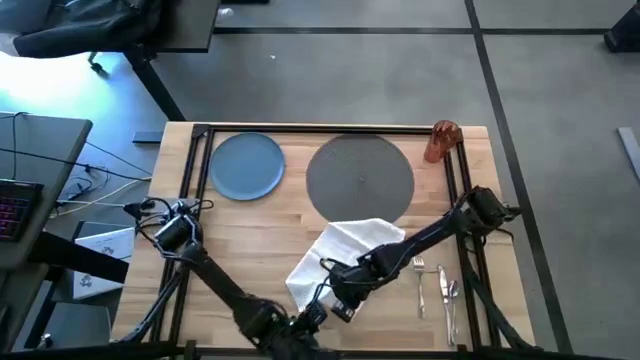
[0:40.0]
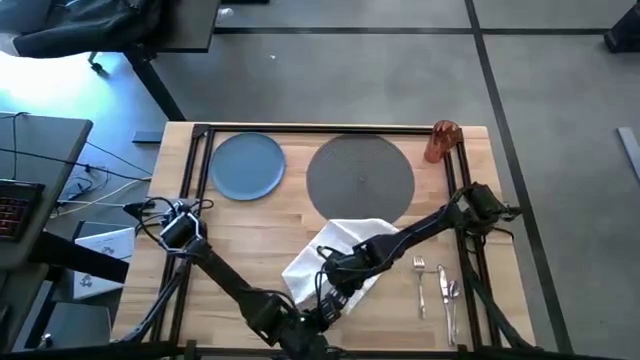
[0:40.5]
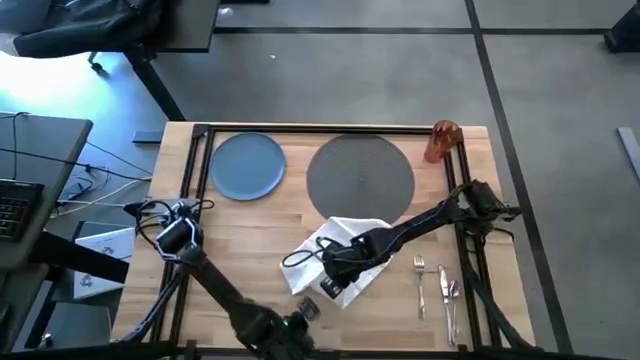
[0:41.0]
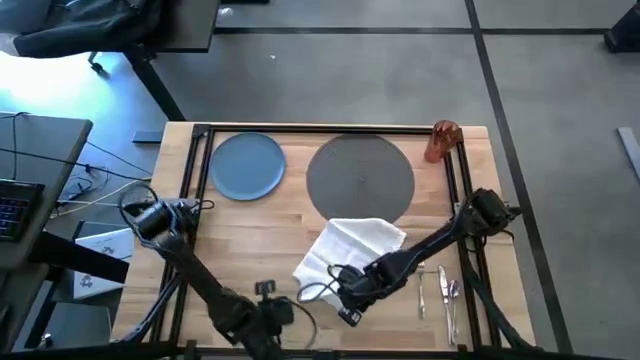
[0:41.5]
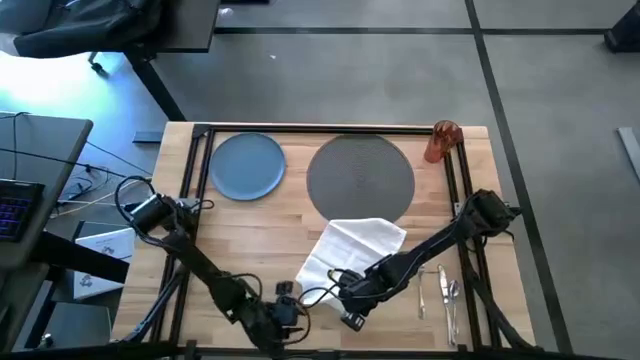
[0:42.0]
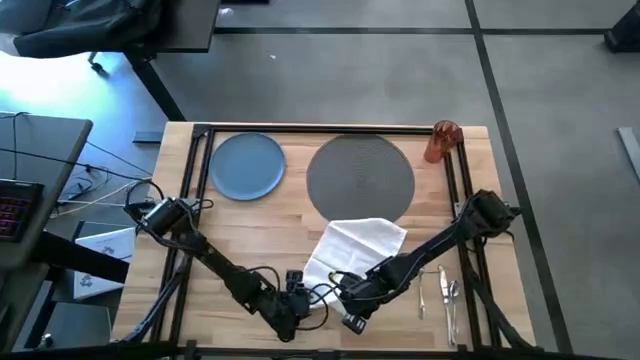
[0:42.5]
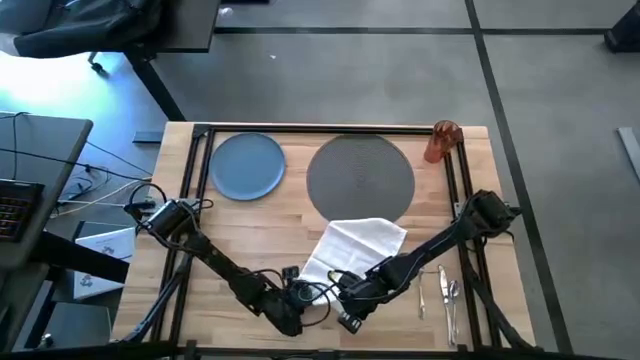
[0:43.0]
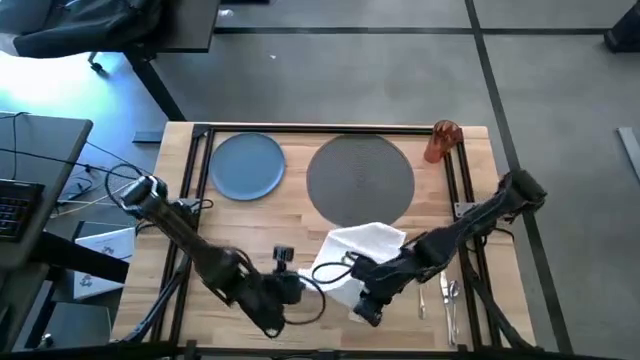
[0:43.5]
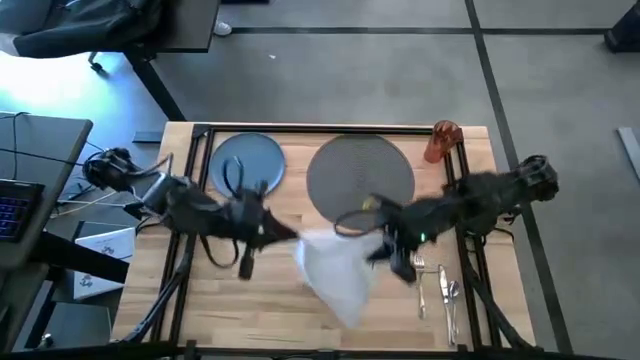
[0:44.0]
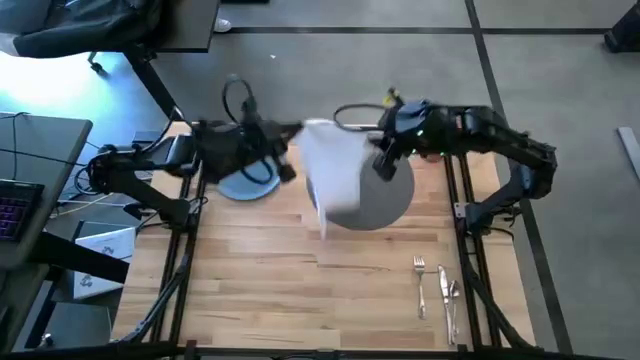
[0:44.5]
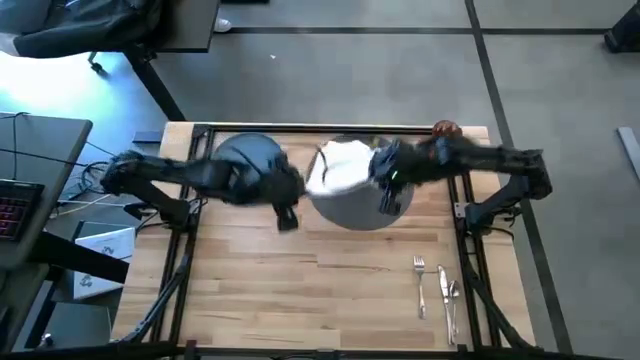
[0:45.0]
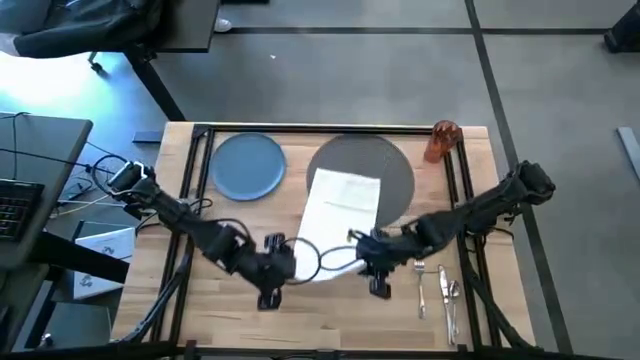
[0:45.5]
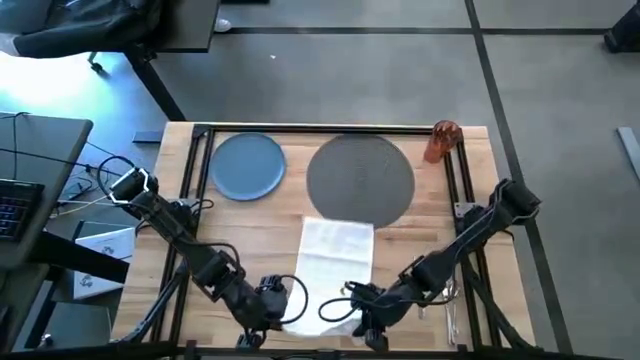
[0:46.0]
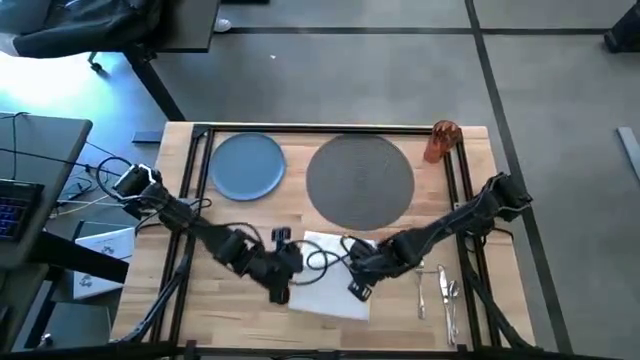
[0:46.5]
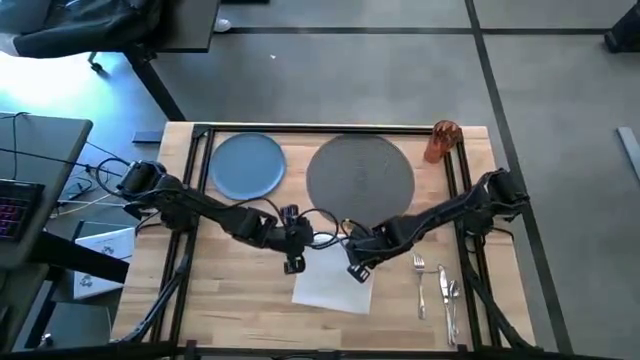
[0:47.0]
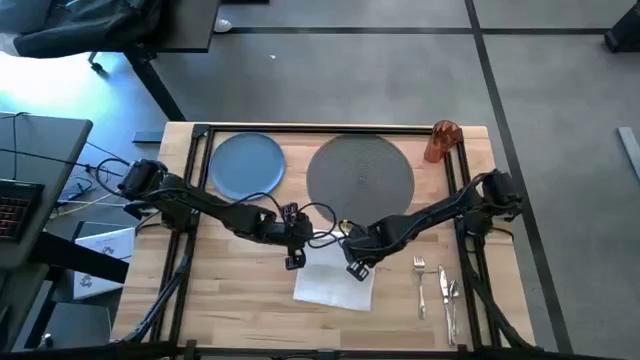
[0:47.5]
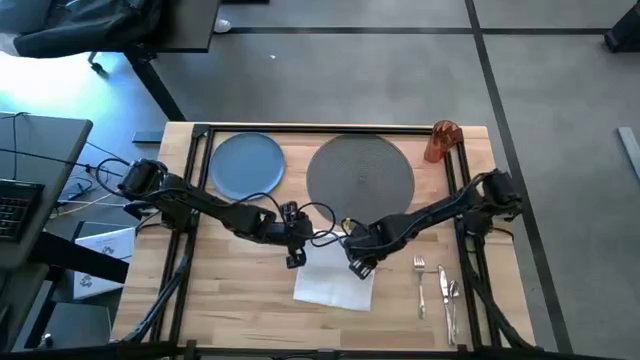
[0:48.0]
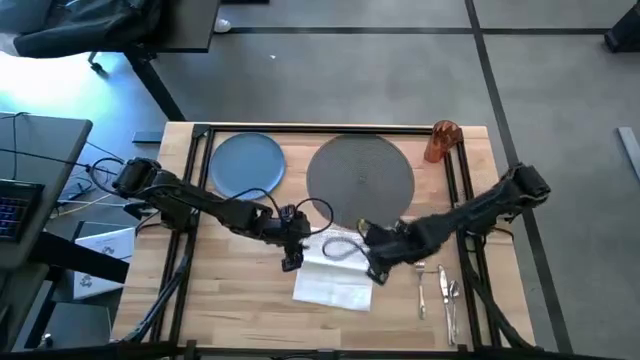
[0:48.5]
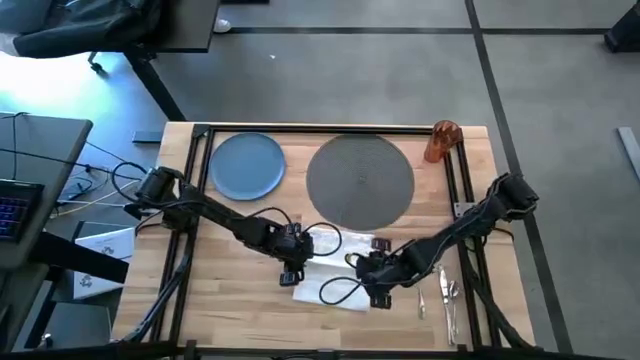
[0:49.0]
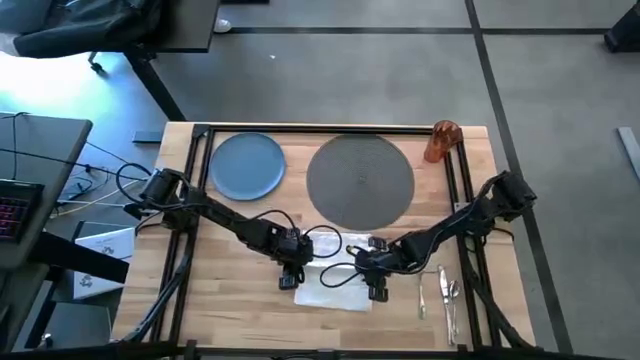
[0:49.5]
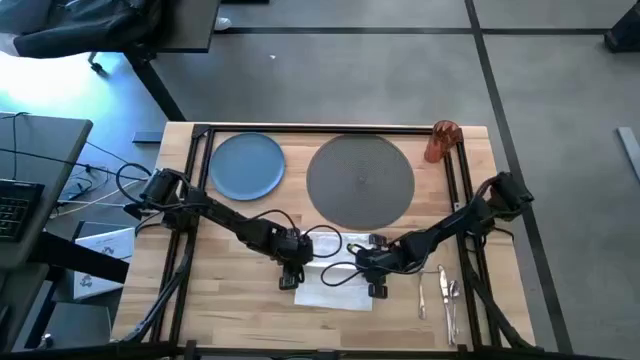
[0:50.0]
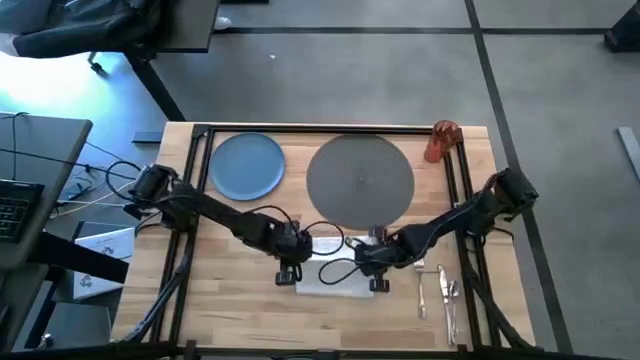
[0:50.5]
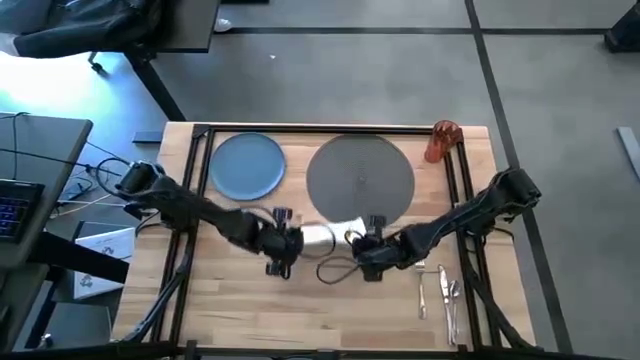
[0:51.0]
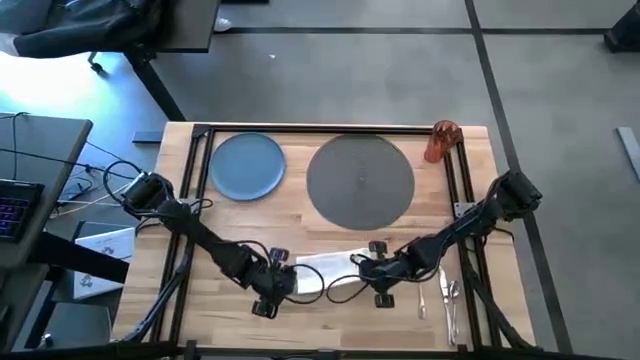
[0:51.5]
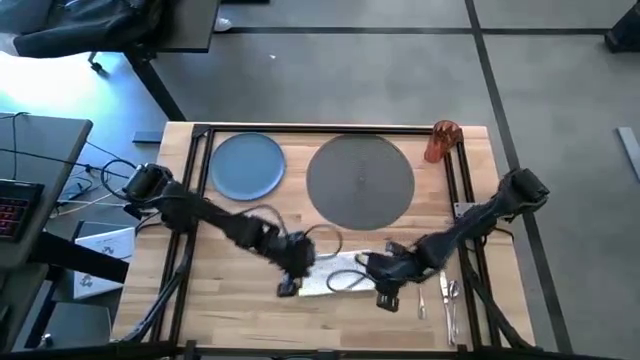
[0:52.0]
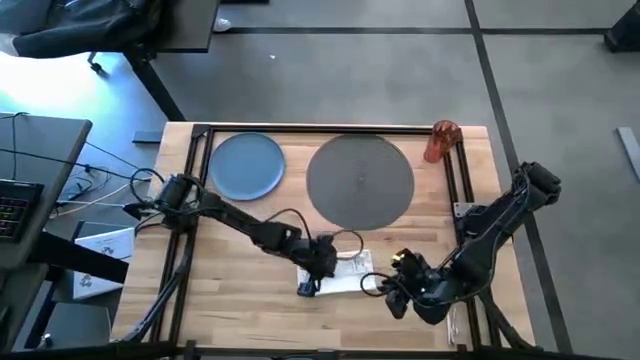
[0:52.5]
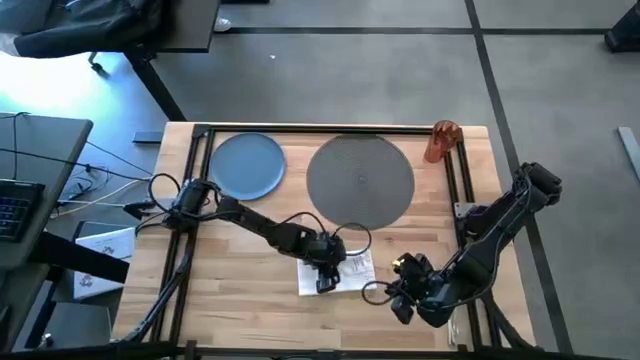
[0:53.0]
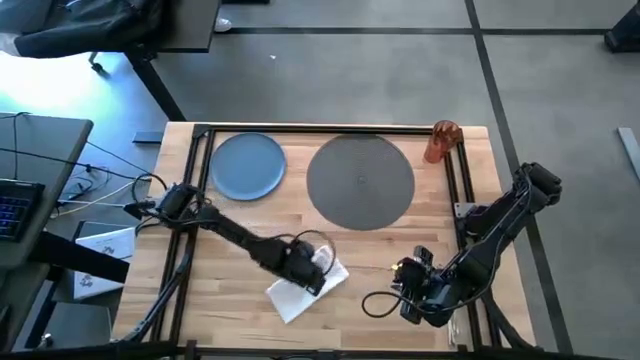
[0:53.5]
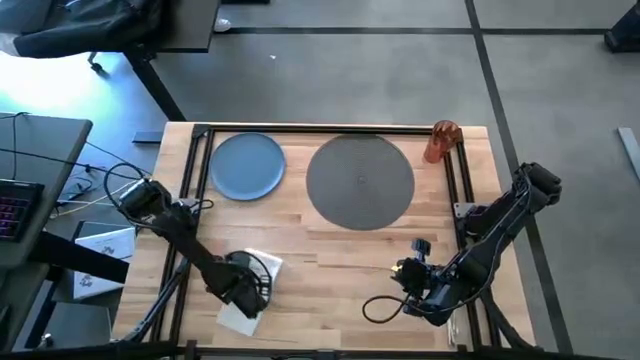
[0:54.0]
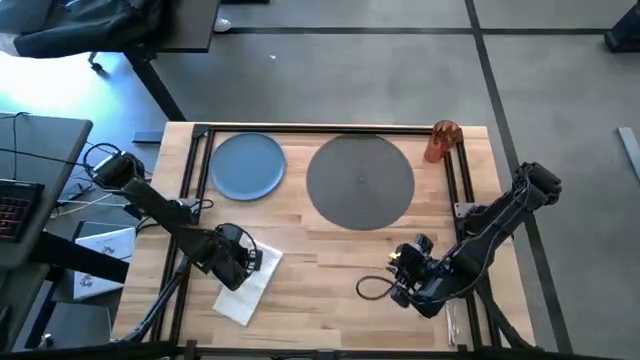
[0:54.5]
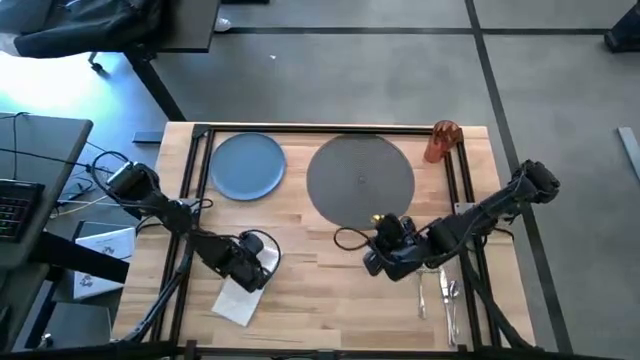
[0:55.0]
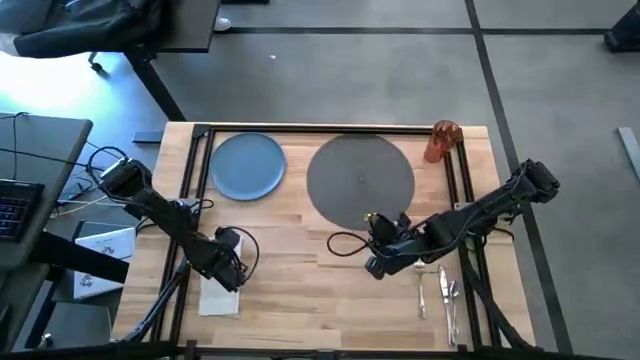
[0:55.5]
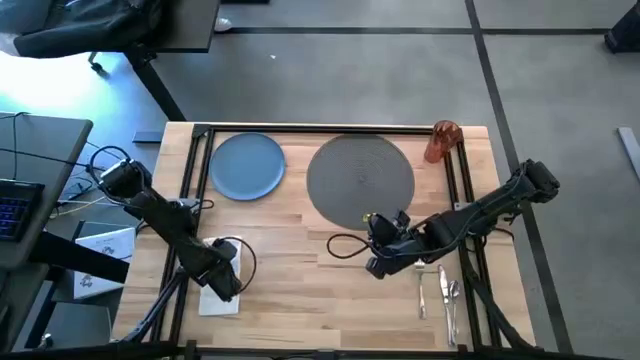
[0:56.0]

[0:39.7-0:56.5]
Task: Set table place
Fold the white table napkin

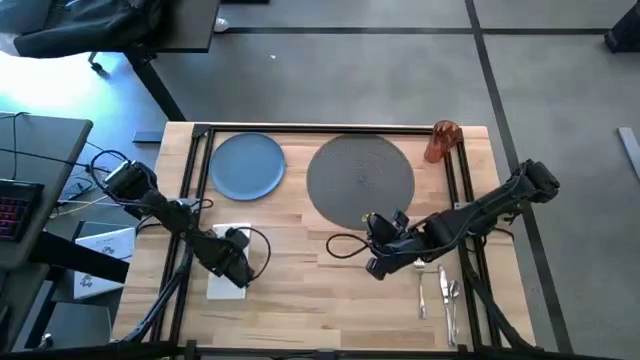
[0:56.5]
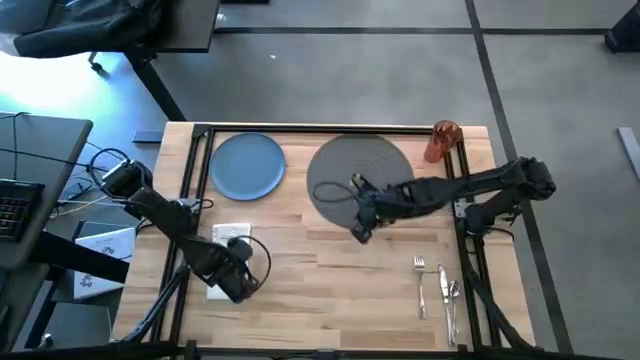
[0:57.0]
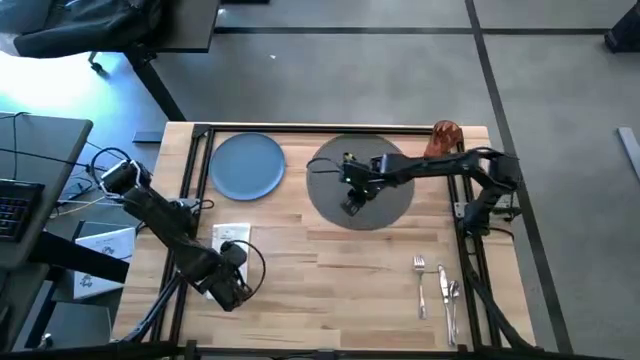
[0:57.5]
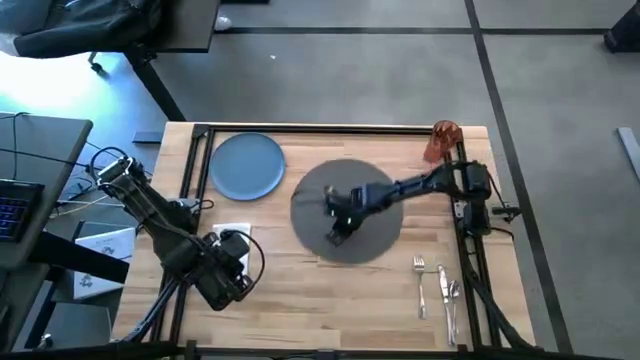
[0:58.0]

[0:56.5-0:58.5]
Move the gray table mat to the center of the table

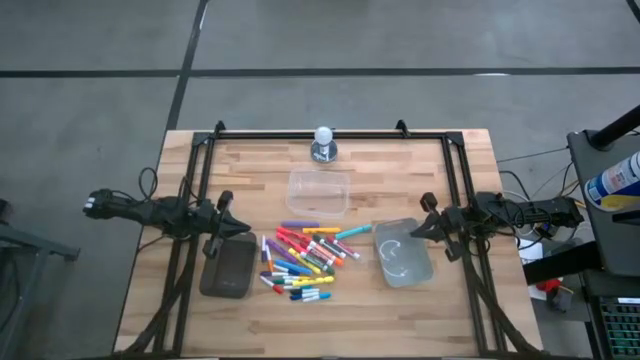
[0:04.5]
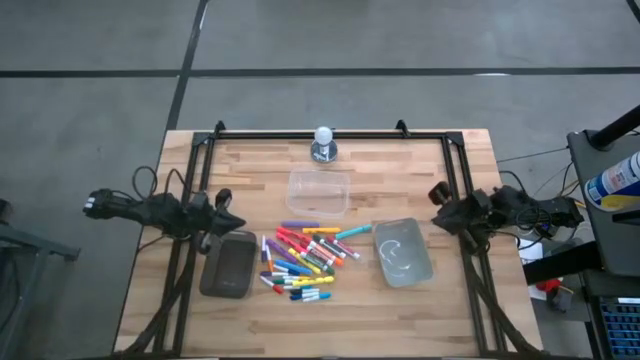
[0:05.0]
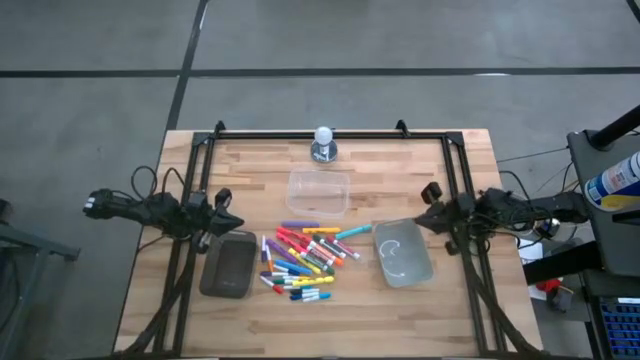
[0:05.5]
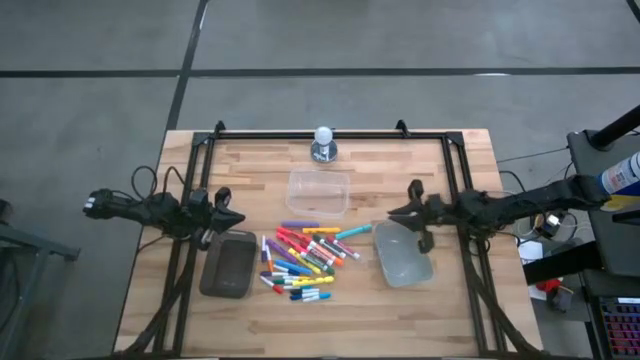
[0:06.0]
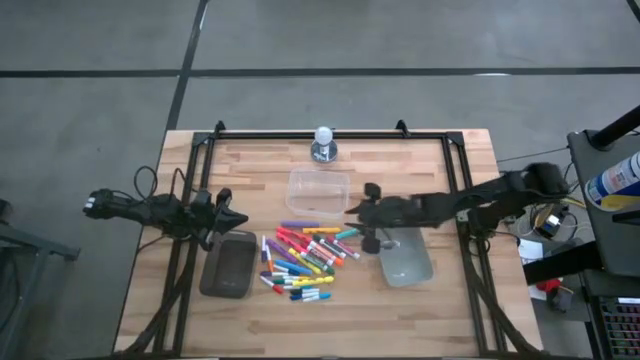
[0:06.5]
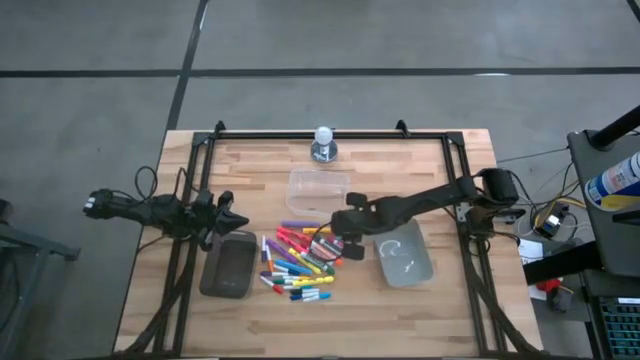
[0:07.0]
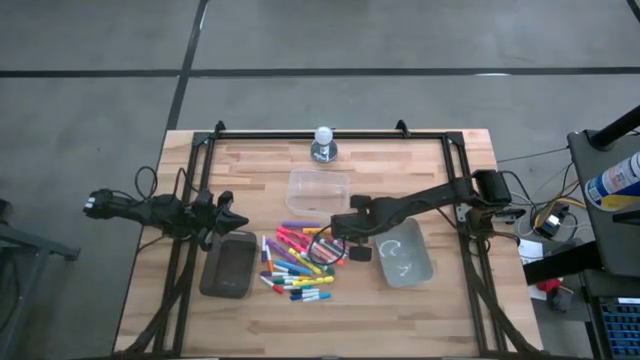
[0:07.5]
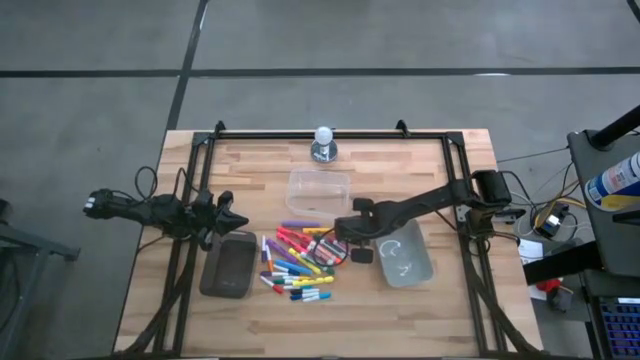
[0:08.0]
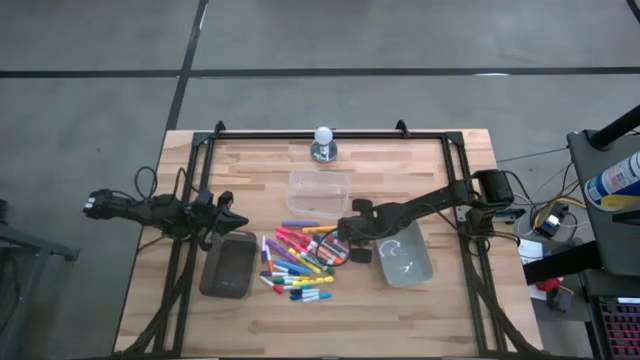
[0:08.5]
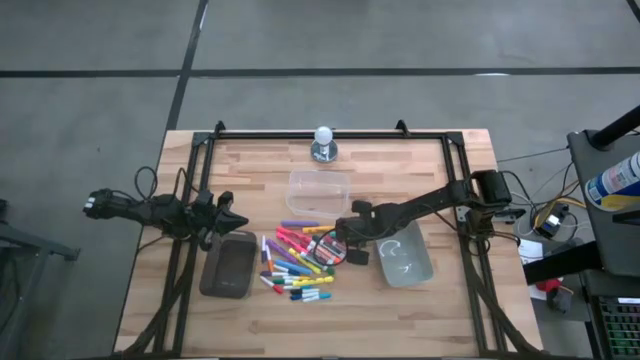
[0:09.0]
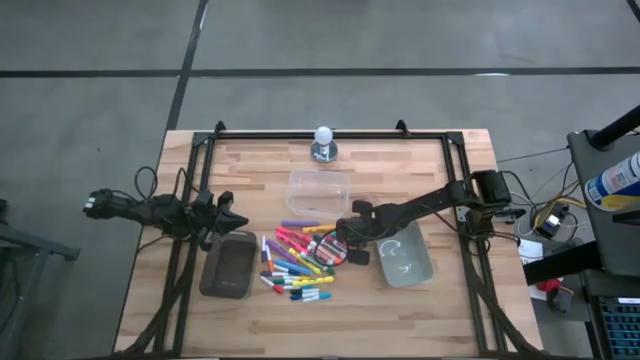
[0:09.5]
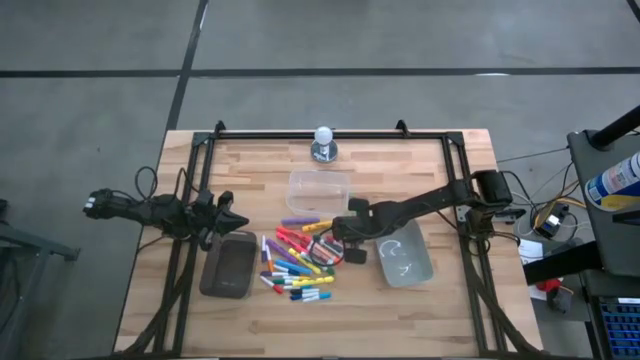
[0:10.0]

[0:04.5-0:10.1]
Task: Pick & Place Markers
Put the light blue highlighter into the gray bin
